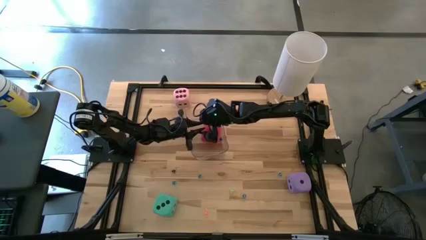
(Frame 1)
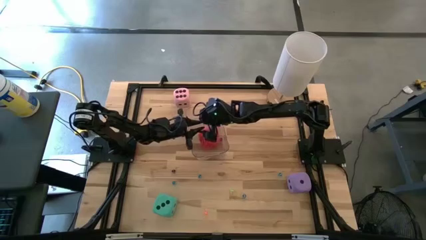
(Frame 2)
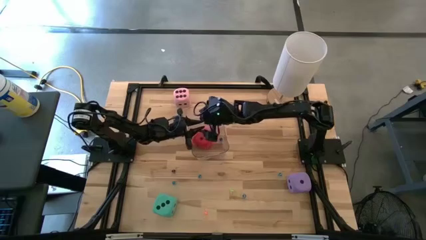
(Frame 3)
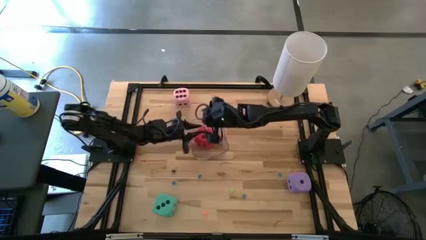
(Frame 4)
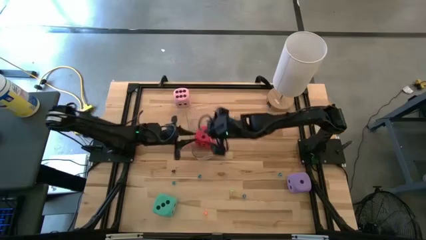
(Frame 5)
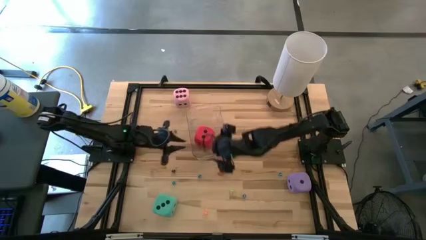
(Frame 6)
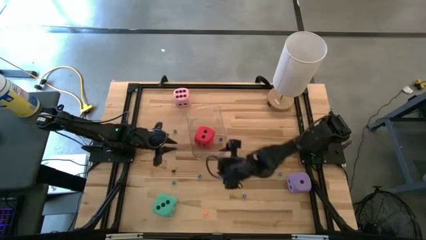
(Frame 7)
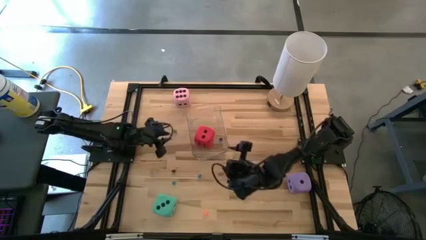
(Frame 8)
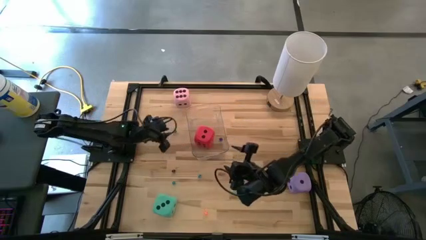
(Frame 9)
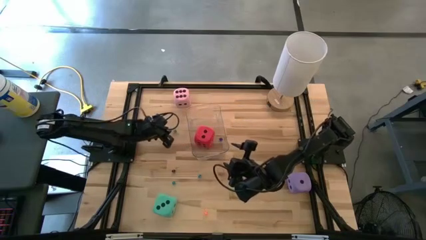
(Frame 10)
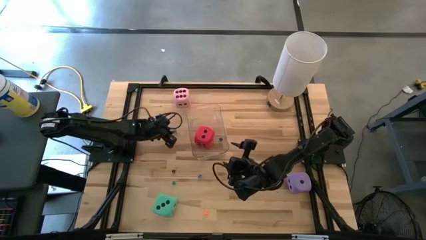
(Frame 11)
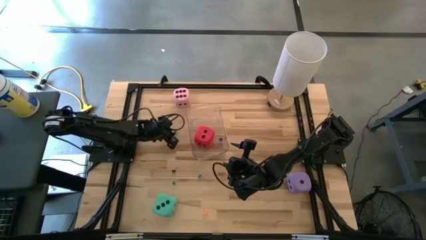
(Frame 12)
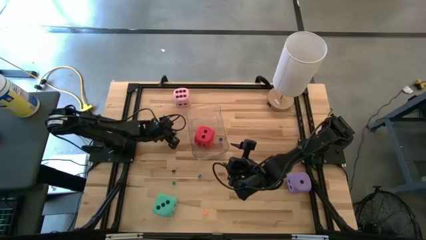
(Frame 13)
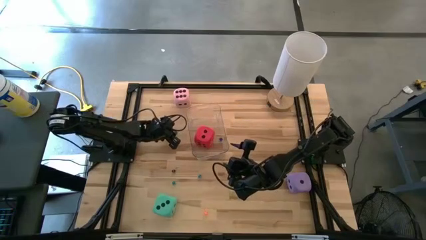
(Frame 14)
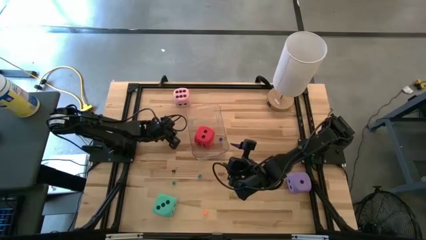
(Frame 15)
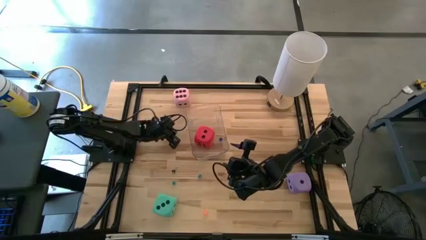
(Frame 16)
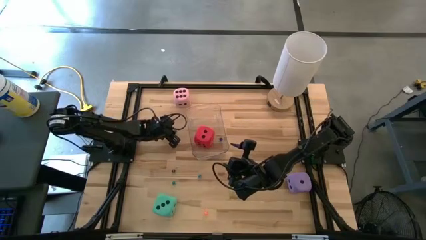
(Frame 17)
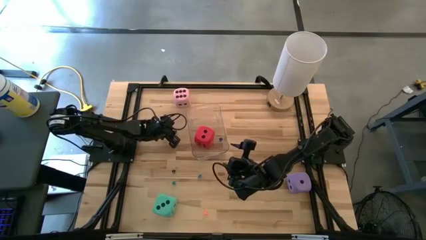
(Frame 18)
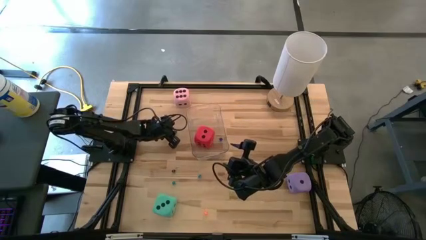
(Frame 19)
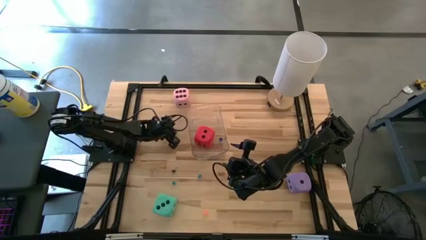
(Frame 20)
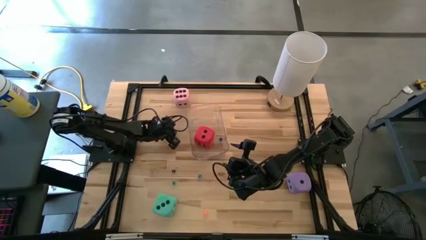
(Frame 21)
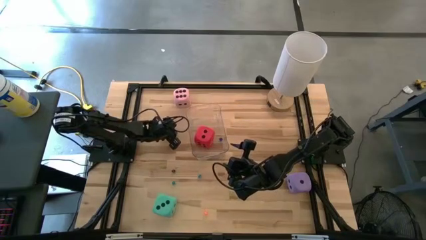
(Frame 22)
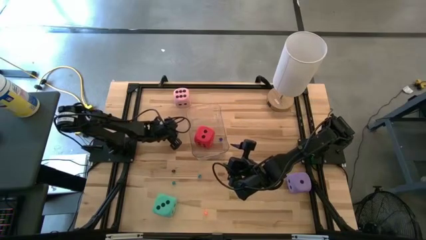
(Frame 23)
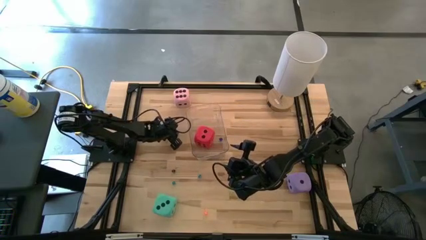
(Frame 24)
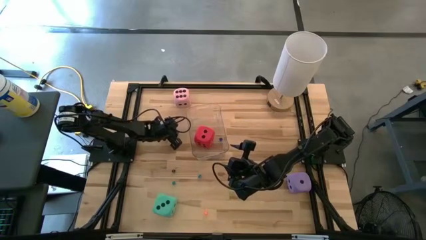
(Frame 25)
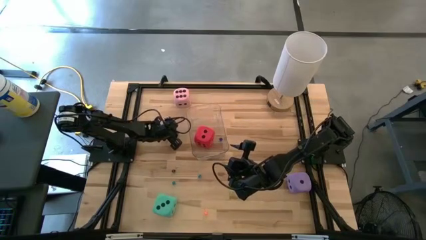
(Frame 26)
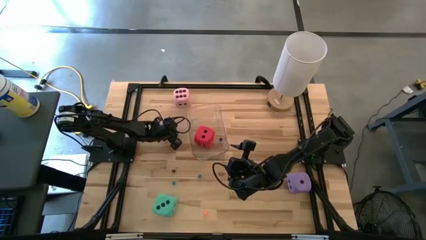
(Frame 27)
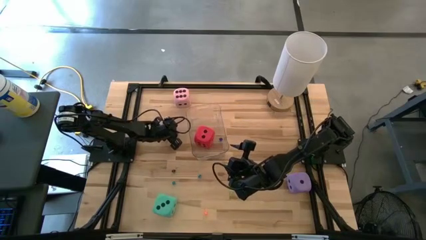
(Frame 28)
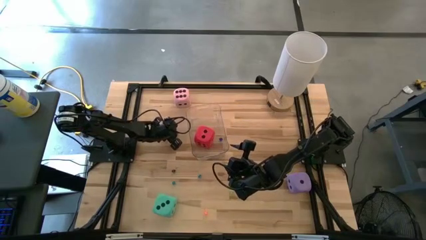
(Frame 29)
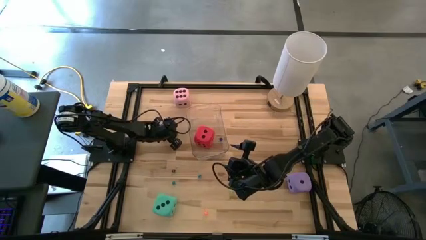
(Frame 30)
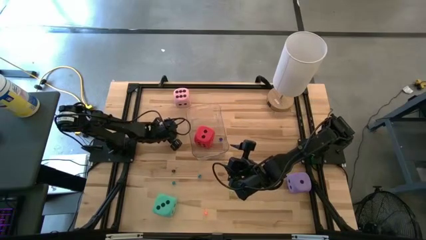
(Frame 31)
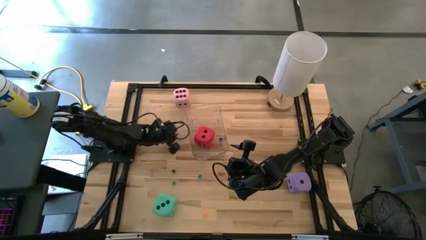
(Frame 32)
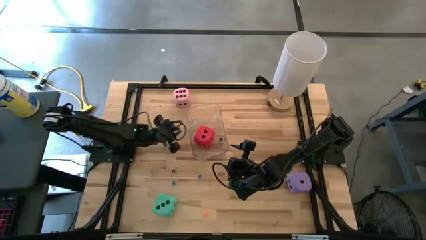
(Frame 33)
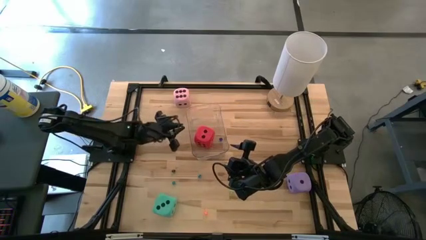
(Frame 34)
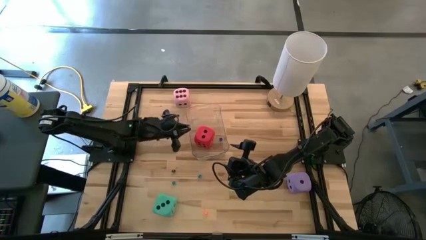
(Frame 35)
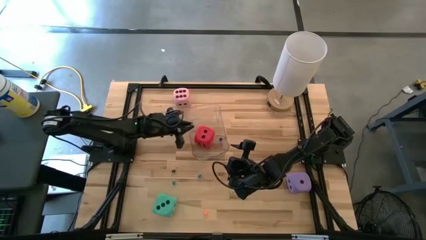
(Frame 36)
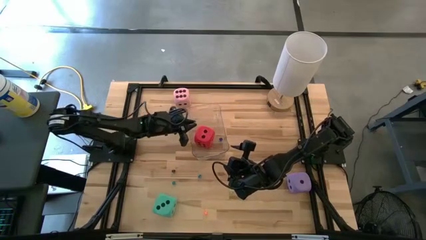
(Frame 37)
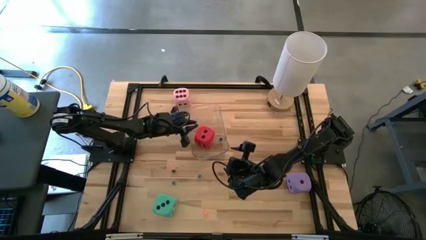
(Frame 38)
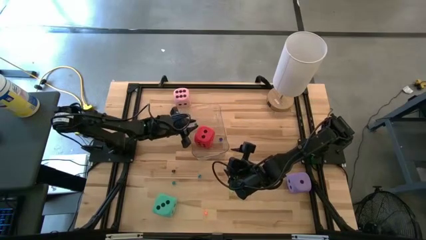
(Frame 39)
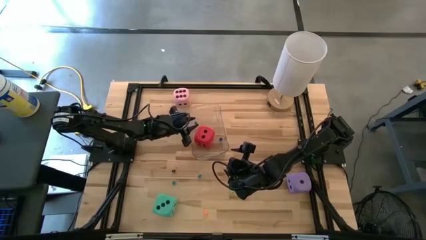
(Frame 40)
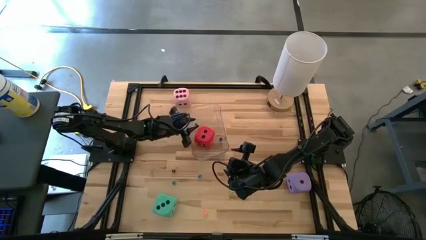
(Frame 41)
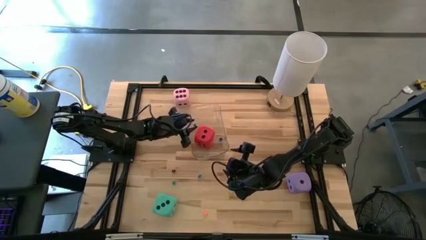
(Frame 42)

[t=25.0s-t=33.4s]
Task: Pick & Place Dice
Put the small green die into the transparent bin

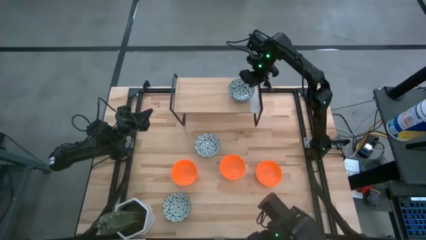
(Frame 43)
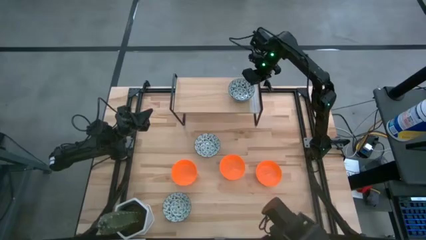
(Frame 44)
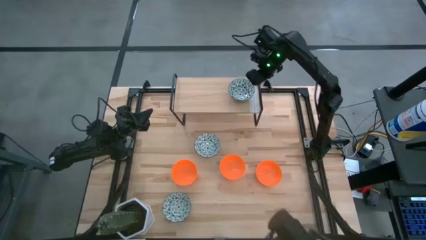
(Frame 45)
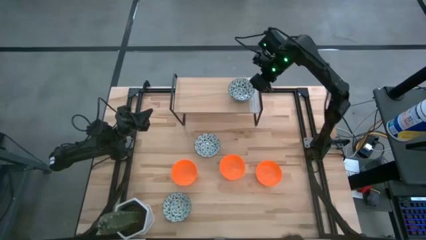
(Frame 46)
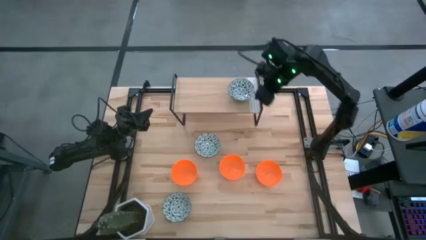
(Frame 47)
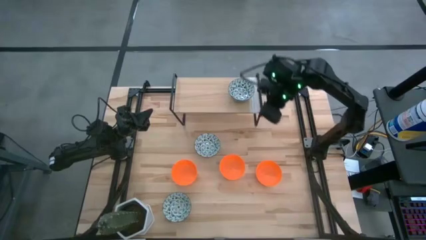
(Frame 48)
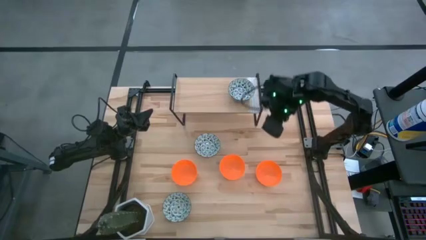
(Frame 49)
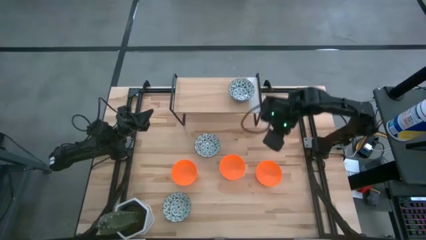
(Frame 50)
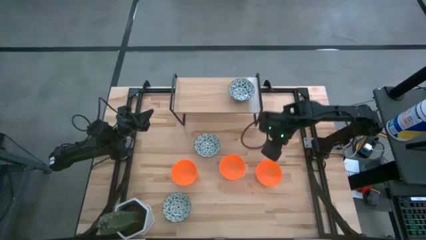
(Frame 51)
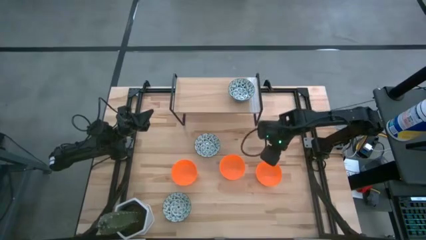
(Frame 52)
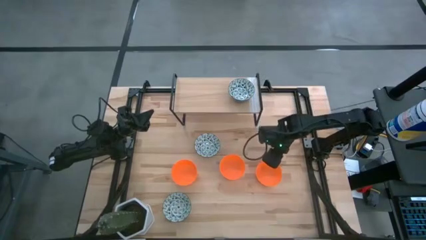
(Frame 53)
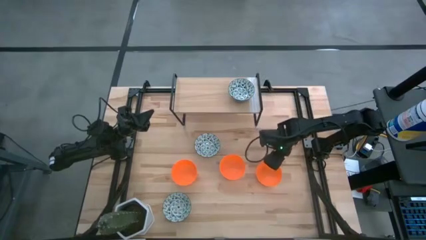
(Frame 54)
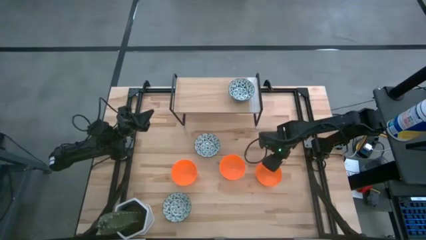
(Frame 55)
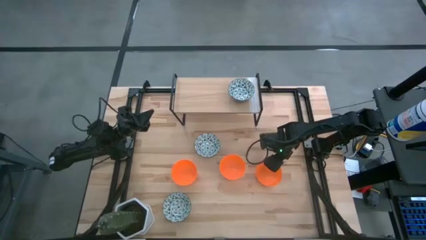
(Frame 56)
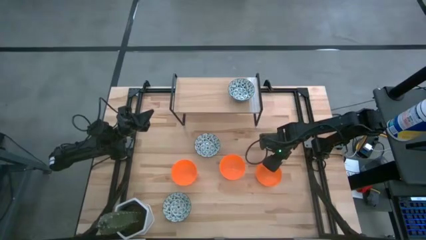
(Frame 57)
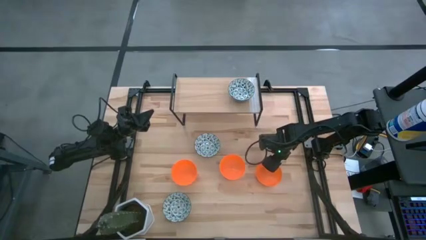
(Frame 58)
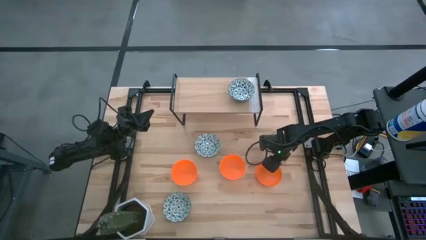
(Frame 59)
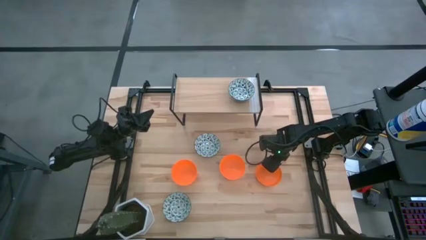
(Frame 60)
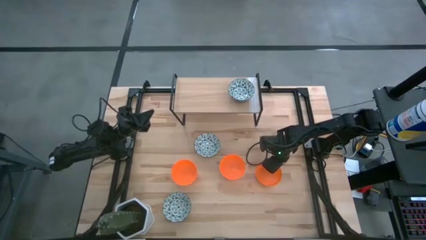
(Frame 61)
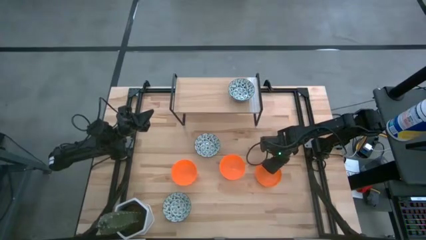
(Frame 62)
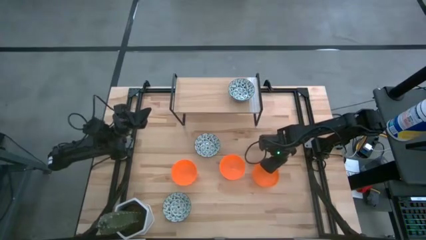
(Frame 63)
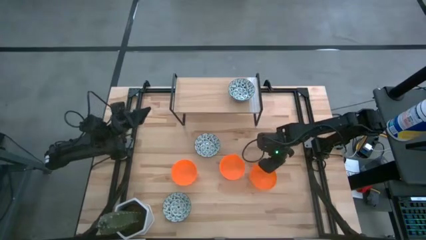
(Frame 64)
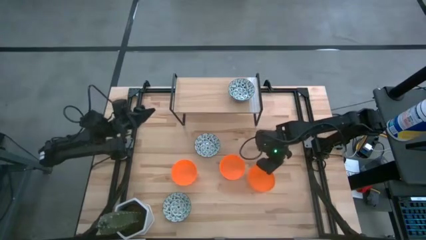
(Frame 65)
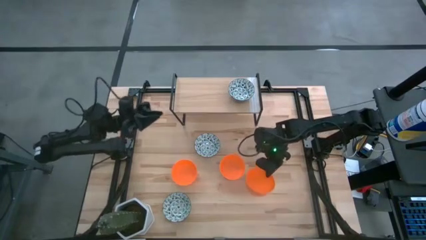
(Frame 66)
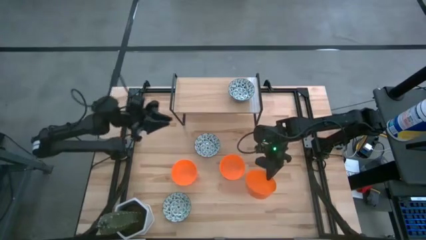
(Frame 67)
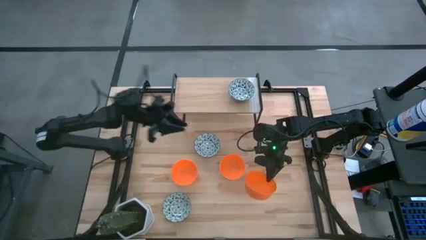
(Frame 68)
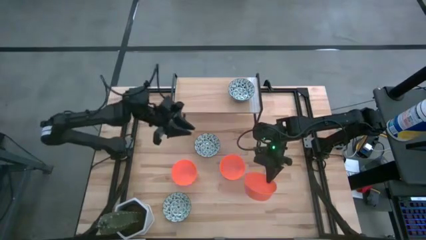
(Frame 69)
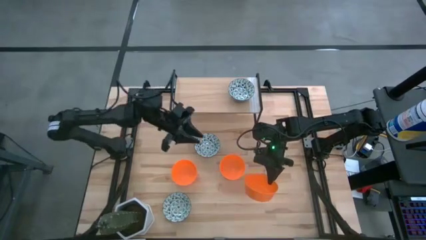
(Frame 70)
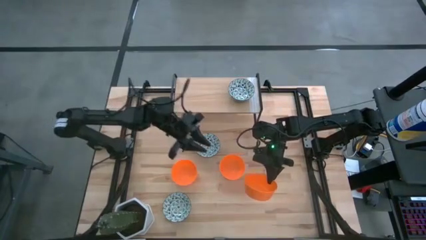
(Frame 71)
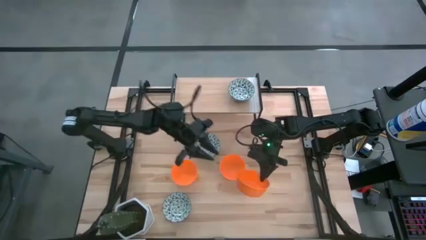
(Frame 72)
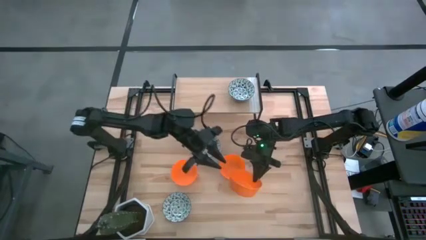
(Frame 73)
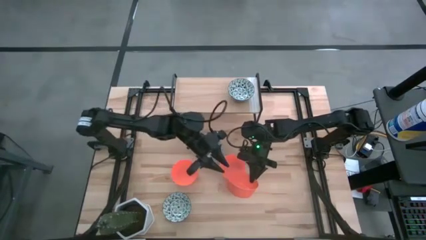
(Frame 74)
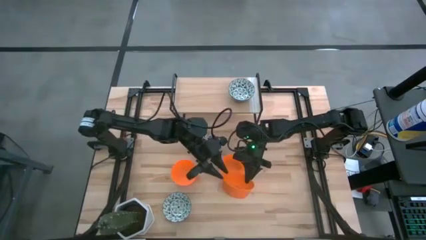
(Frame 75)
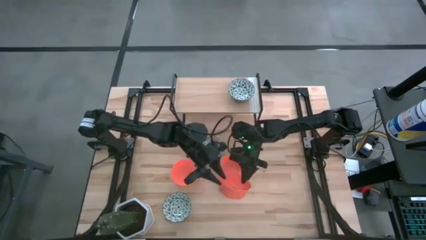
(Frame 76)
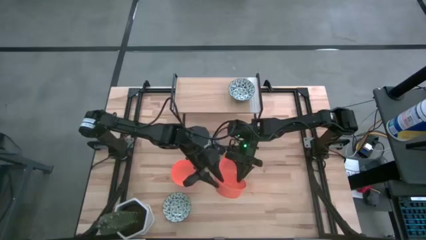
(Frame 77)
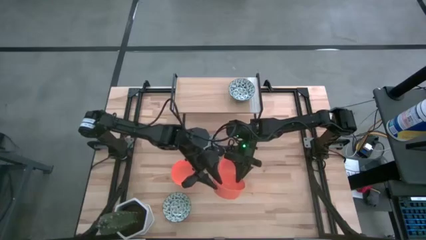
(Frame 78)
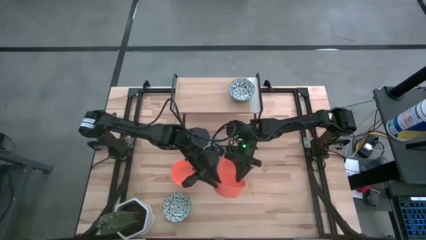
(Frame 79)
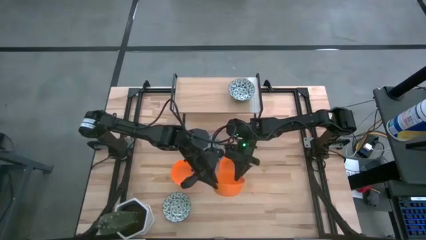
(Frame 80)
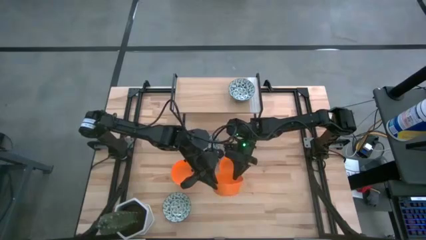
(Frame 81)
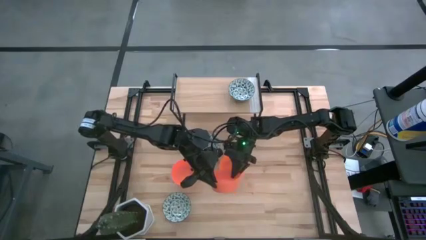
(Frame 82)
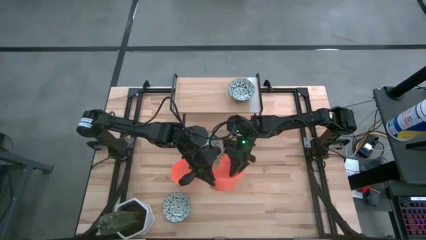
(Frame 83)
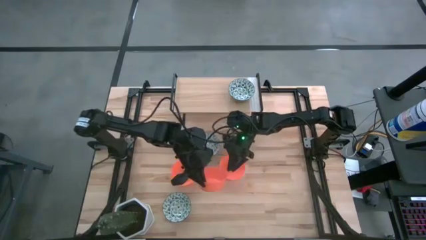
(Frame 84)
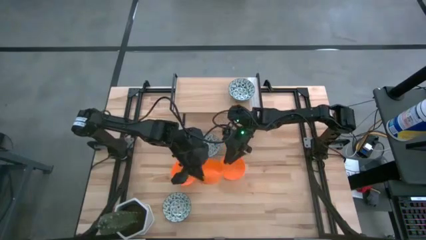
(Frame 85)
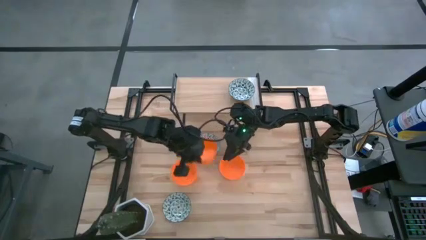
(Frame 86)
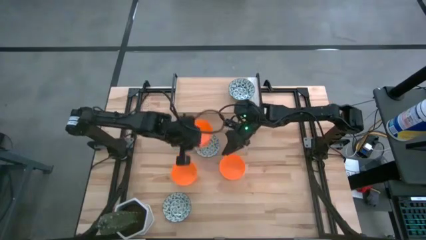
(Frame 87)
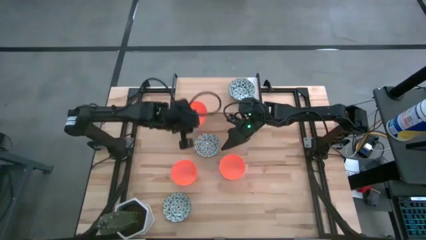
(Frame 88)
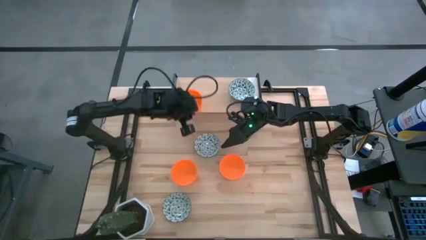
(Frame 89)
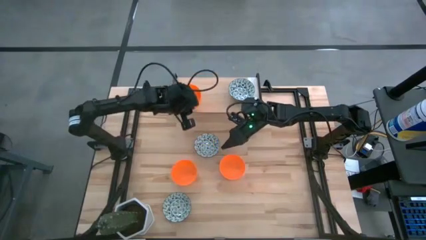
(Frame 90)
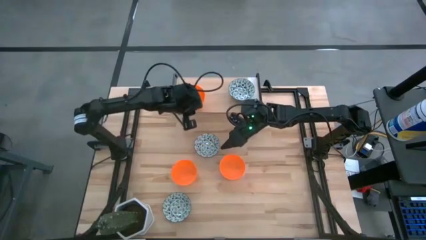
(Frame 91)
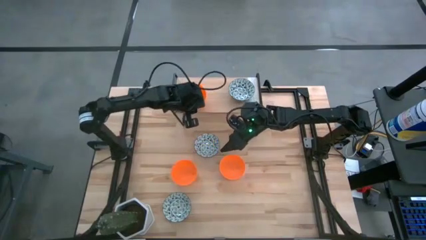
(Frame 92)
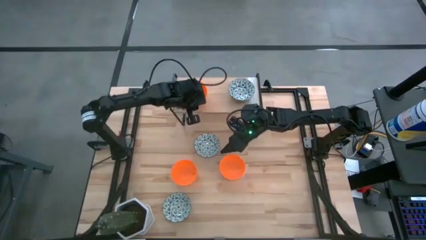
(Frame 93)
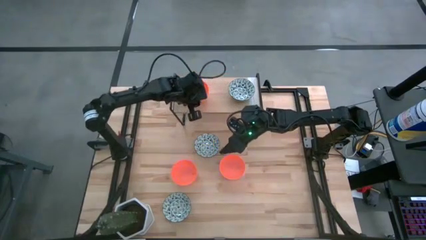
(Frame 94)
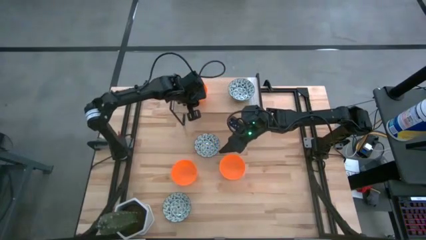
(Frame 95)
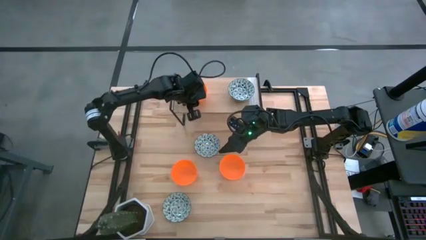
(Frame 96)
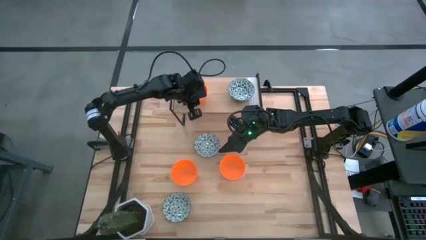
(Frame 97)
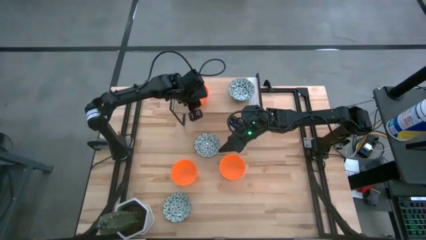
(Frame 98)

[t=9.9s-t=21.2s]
Task: Pick & Place Mini bowls
Put the right orange bowl on the shelf
